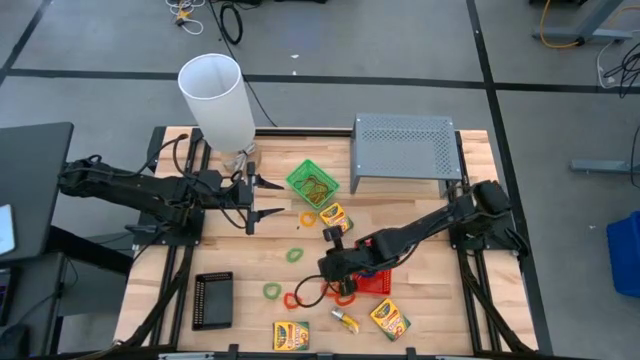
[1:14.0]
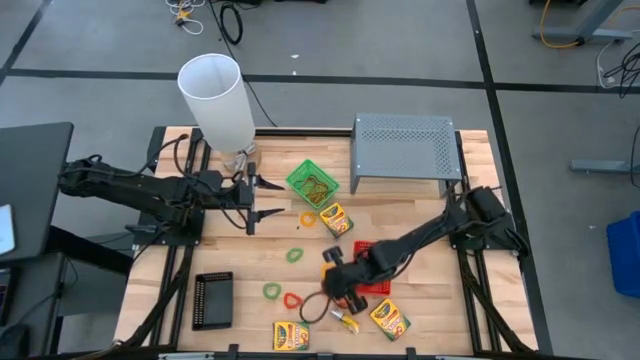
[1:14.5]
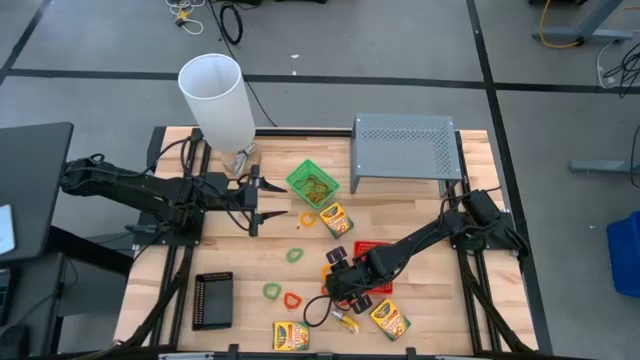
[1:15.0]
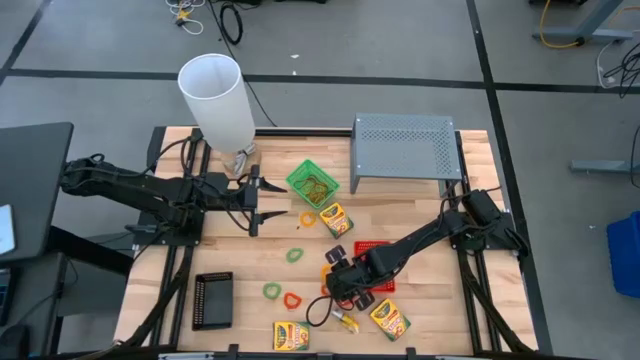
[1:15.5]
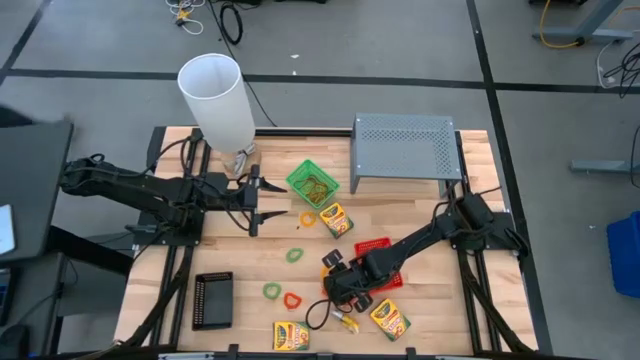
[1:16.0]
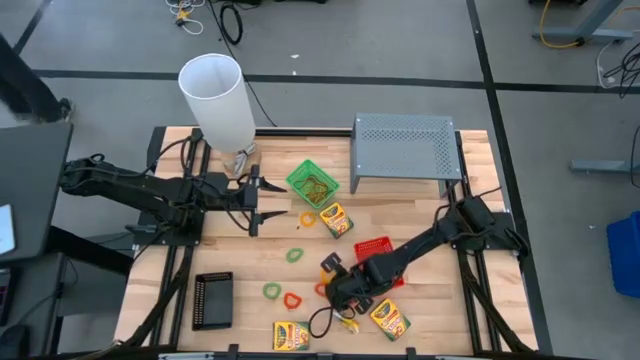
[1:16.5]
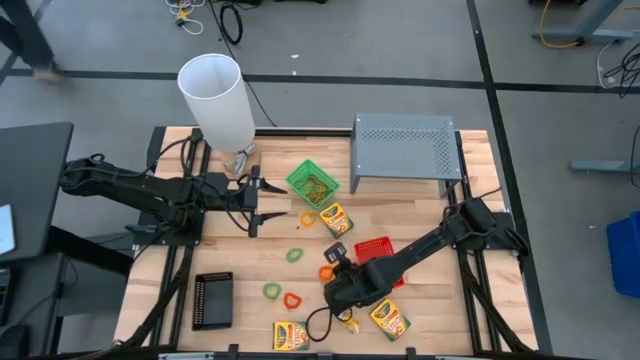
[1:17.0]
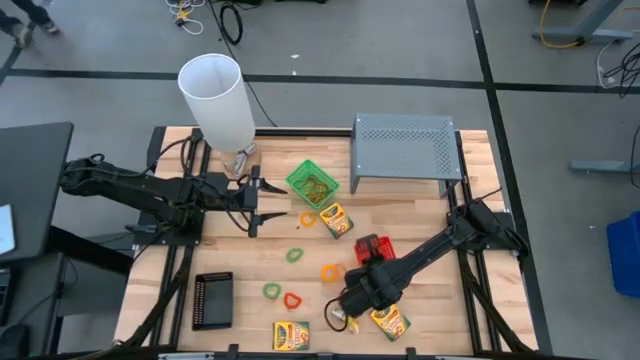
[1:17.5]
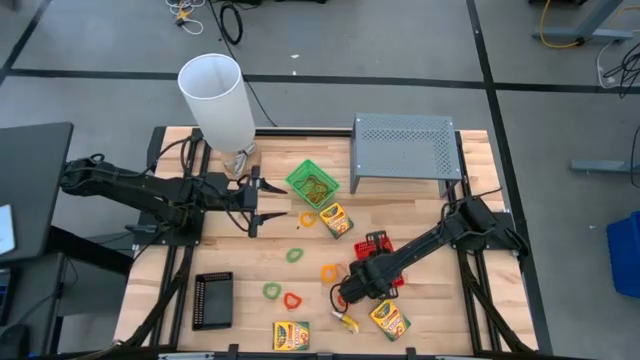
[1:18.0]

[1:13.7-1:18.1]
Task: Pick & Place Office Desk Supplies
Put the orange spring keychain into the red bin

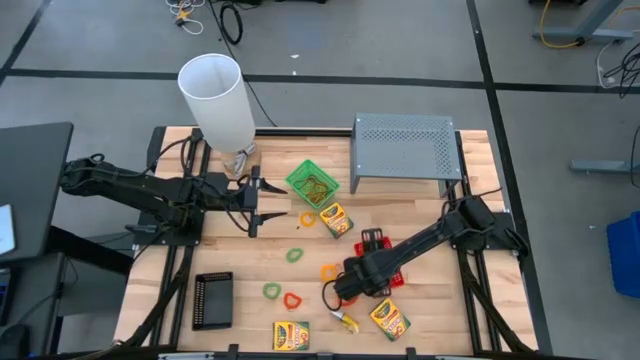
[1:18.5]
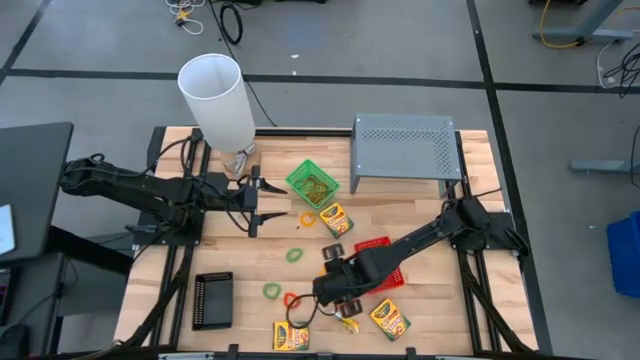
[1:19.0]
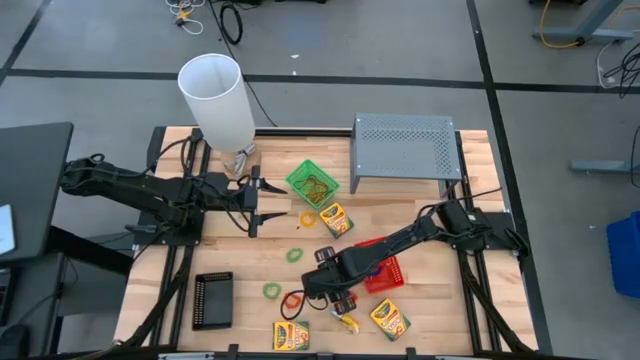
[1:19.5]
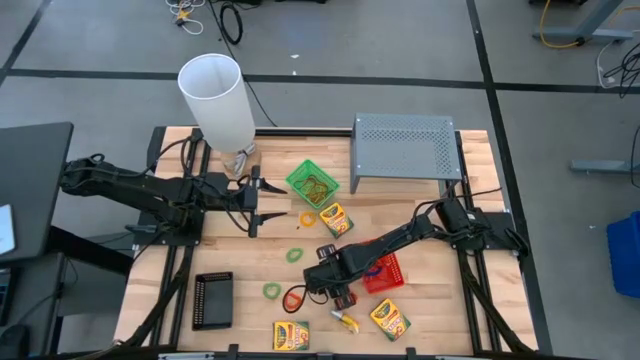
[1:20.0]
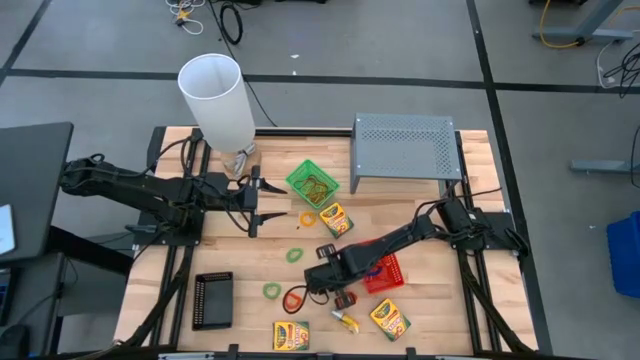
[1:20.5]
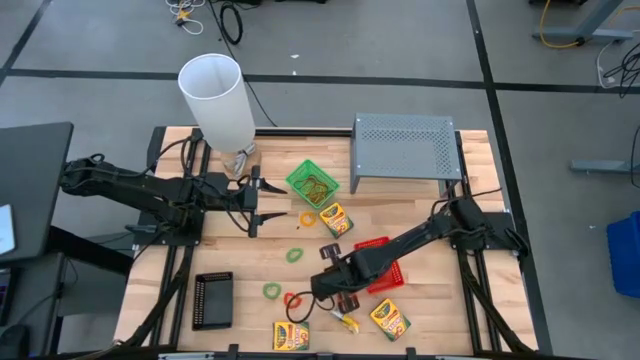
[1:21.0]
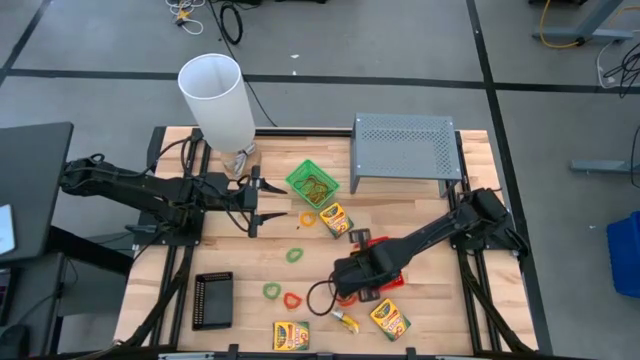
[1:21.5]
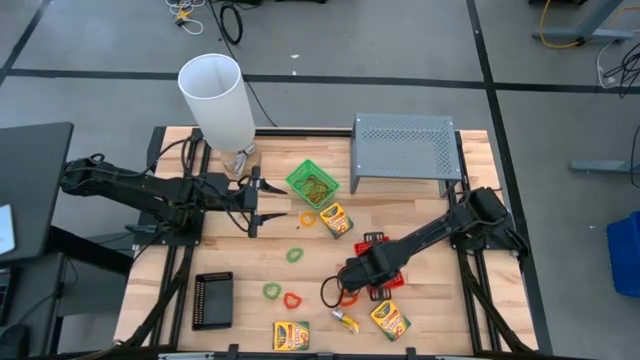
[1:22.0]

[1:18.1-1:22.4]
Put the yellow spring keychain into the red bin

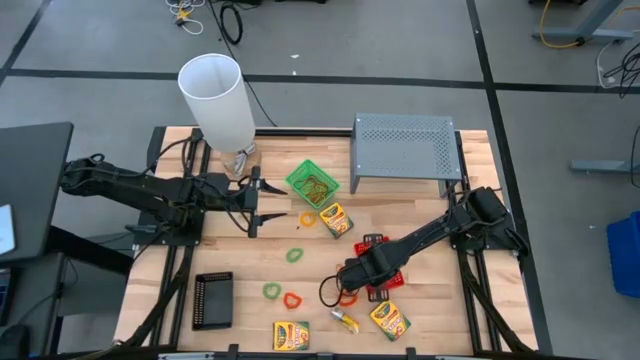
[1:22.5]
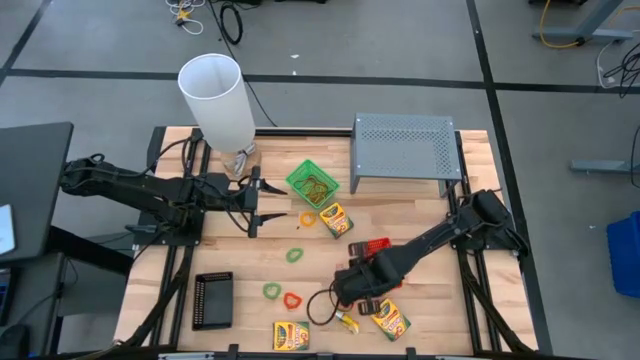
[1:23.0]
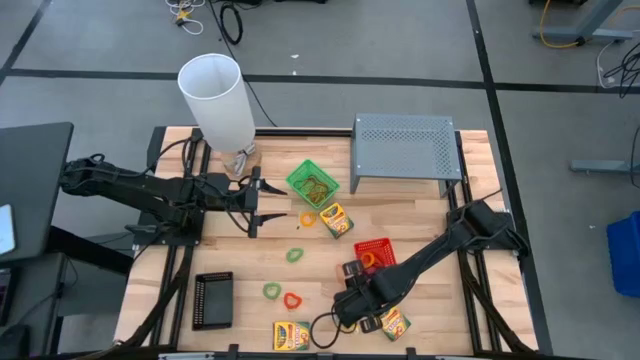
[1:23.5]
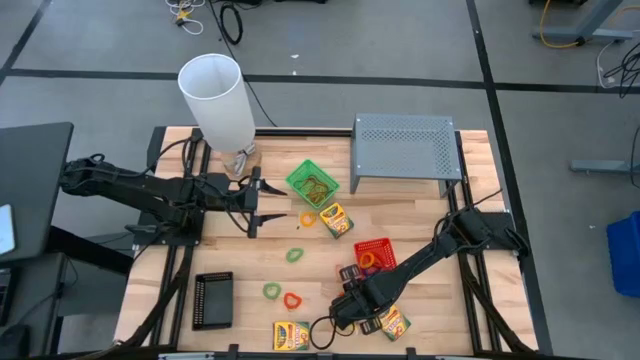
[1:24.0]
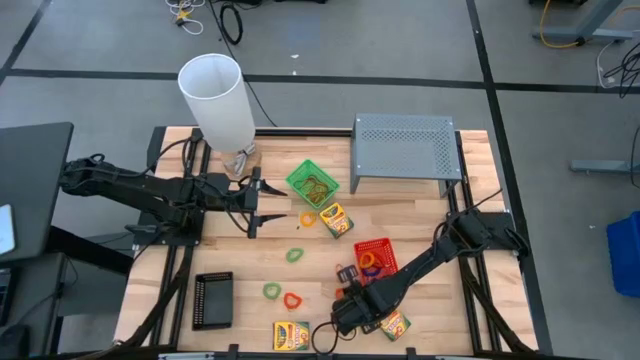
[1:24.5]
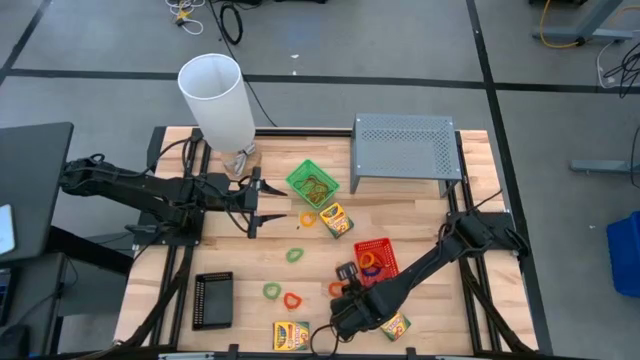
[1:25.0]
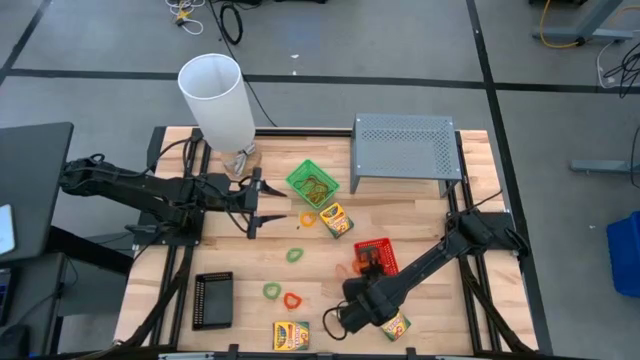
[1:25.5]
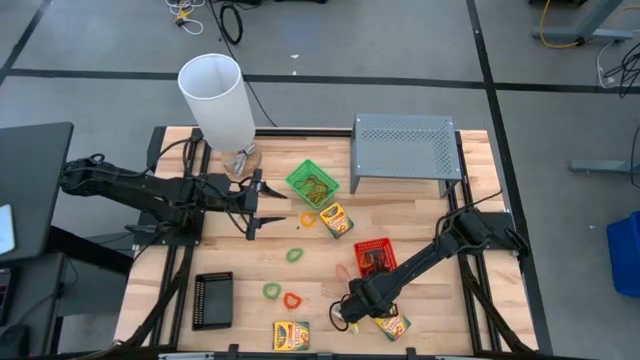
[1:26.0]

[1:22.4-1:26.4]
Put the orange spring keychain into the red bin

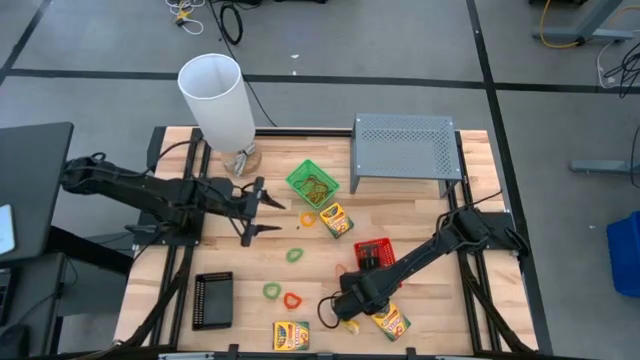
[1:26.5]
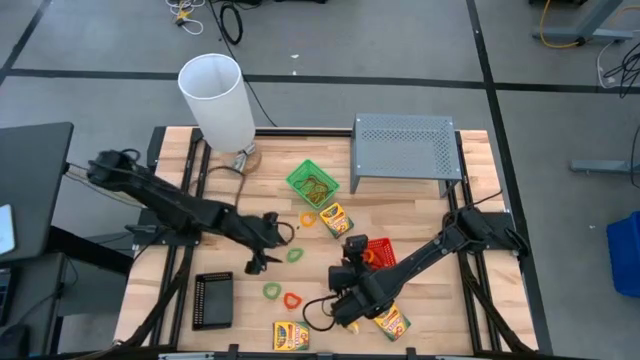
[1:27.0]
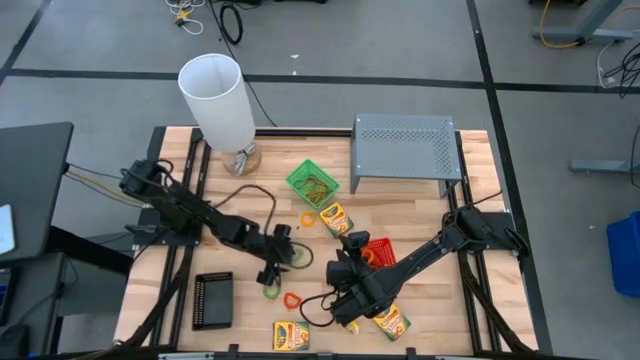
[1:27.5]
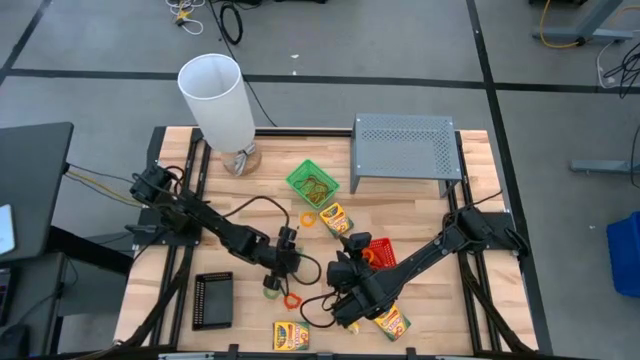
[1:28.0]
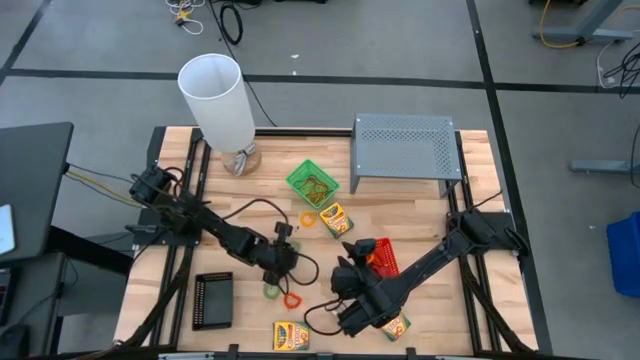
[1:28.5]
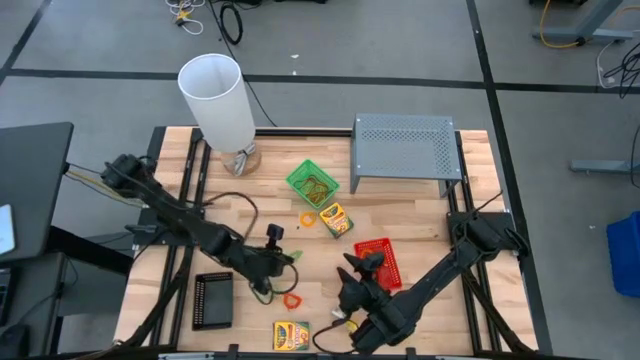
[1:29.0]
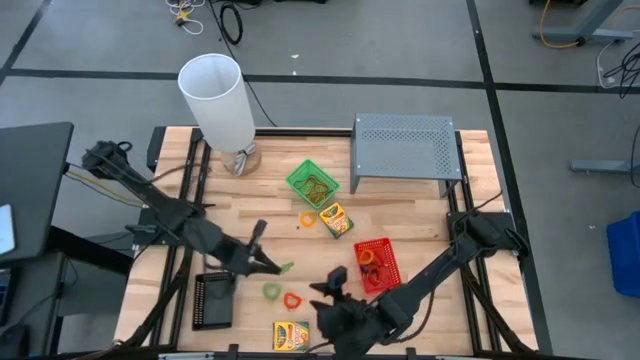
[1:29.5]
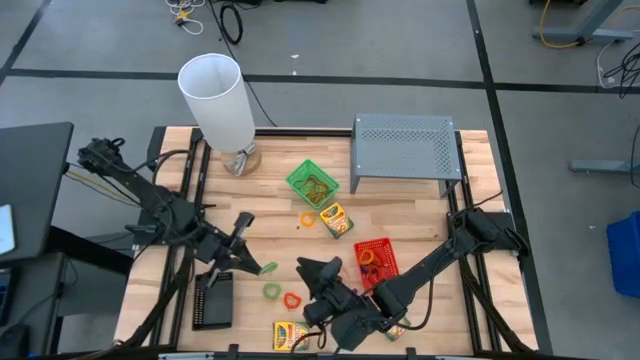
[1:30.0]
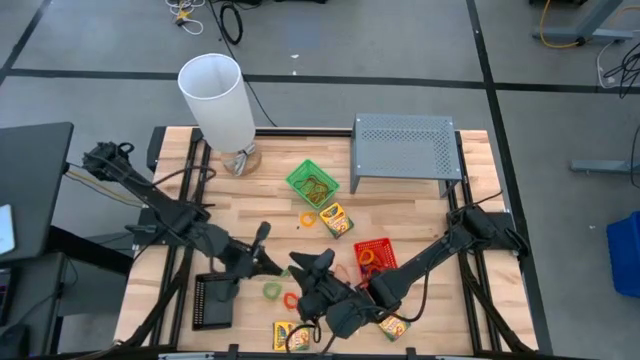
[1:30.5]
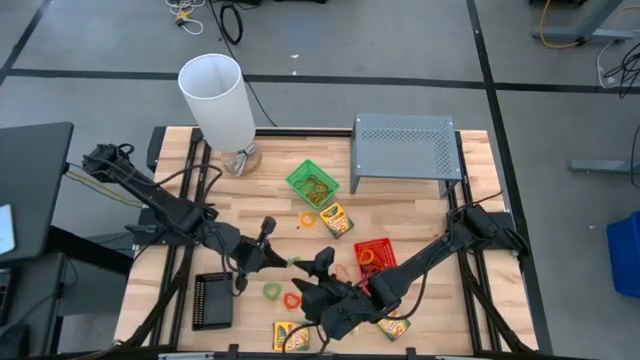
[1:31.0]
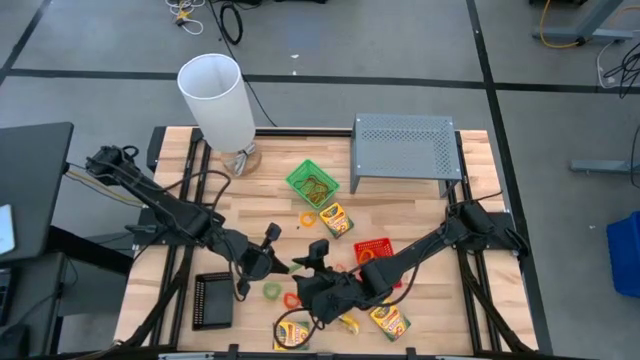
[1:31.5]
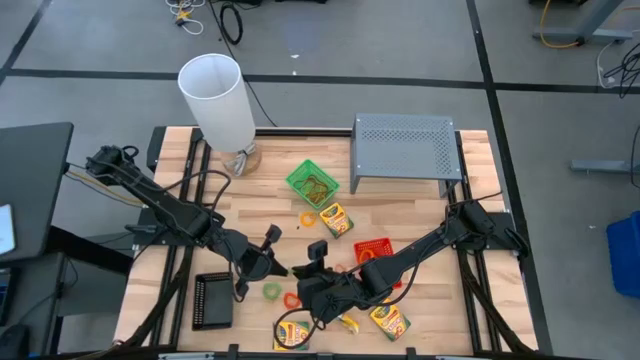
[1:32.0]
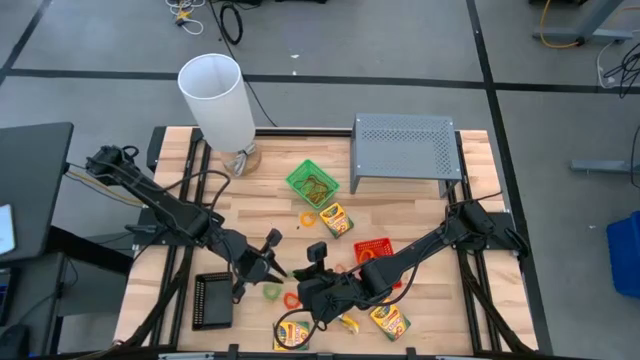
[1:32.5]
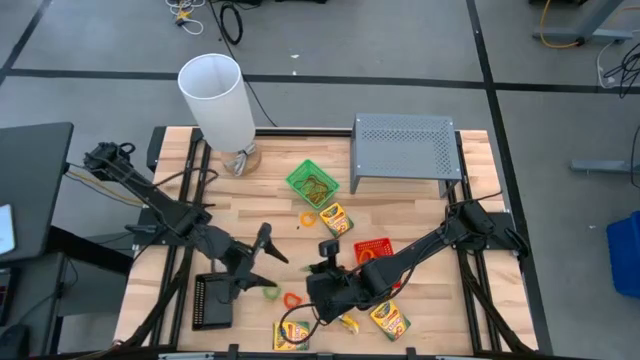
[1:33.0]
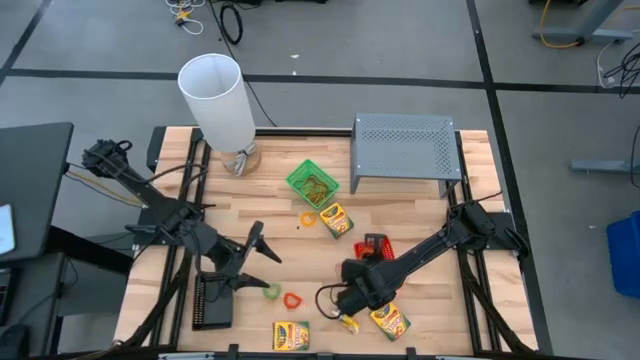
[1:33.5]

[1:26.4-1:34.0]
Put the green rubber band into the red bin

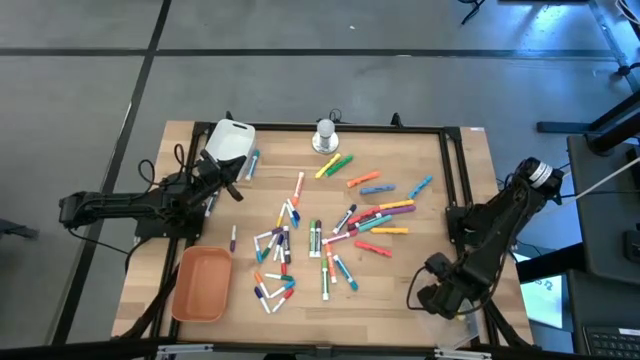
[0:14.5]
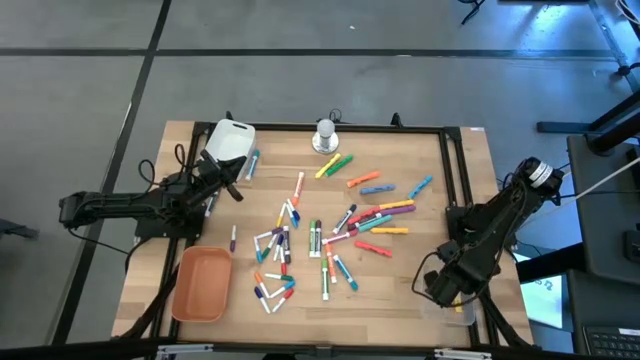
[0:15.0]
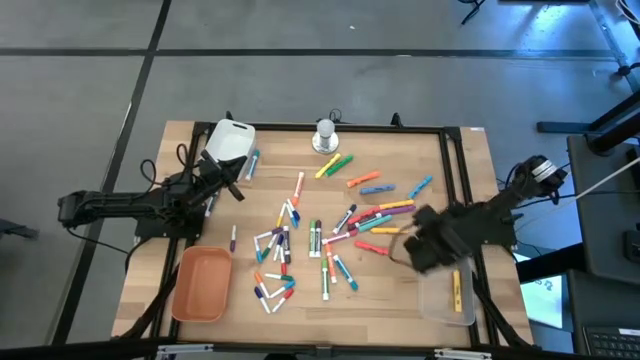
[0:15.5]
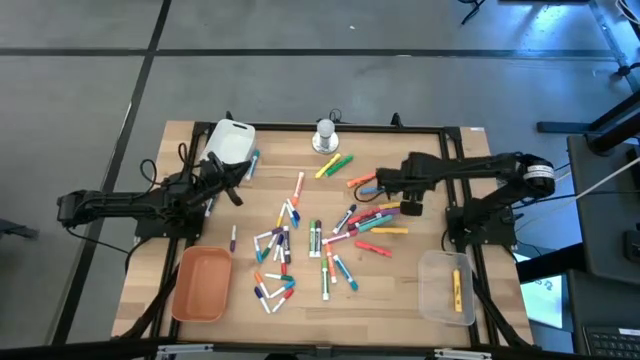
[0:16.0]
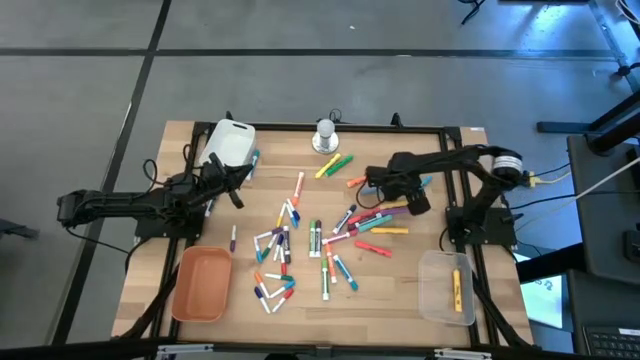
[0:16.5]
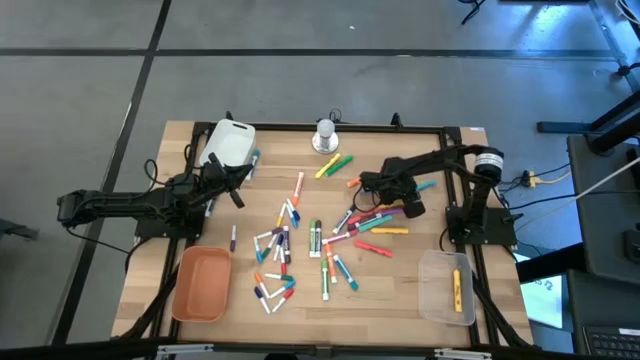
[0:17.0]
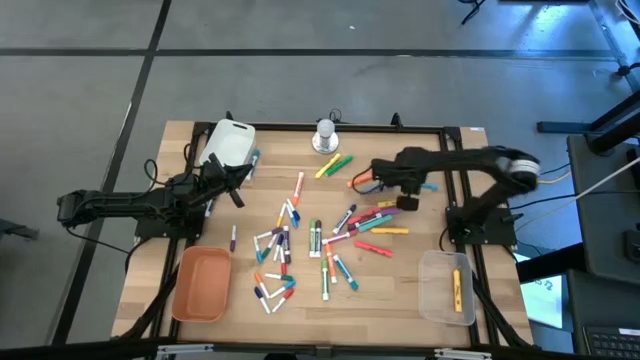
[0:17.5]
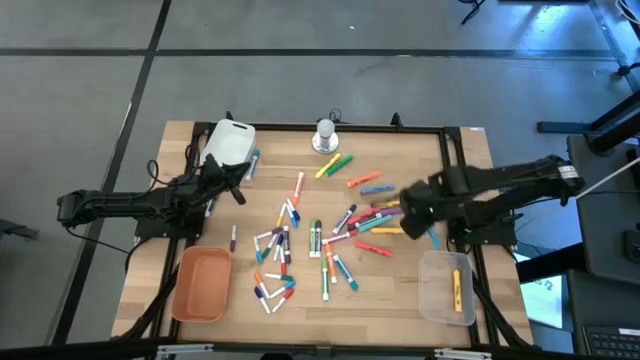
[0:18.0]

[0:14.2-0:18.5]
Task: Pick & Place Markers
Put the blue highlighter pen into the transparent bin
